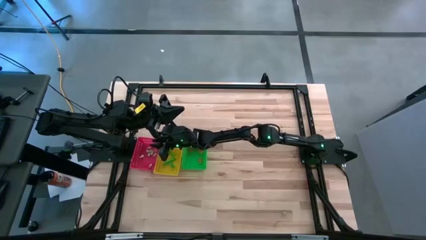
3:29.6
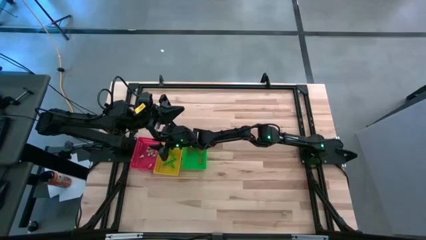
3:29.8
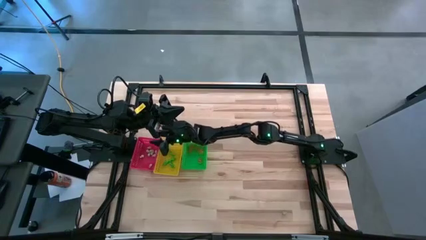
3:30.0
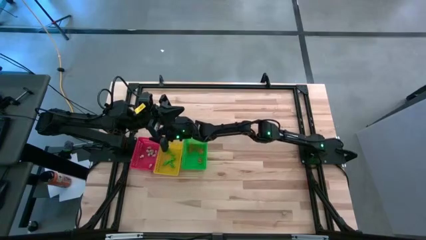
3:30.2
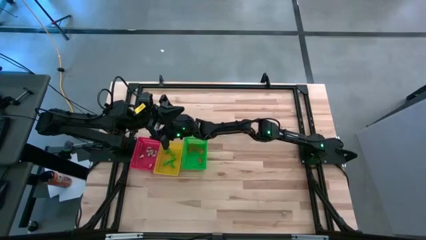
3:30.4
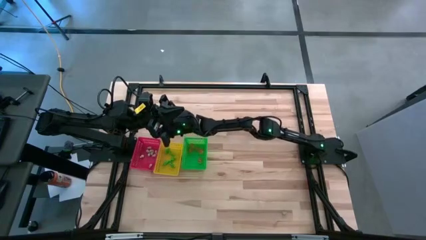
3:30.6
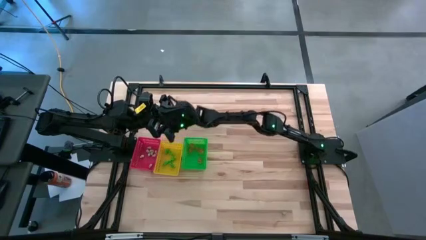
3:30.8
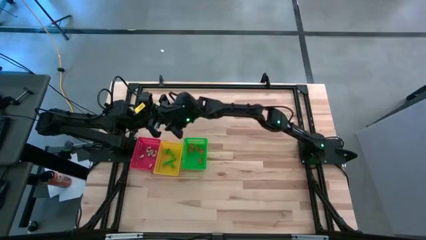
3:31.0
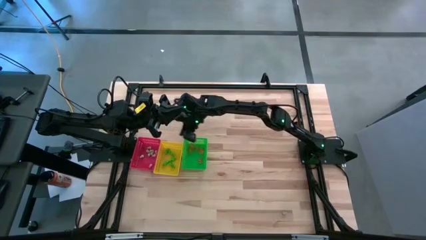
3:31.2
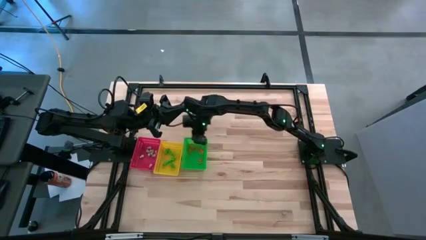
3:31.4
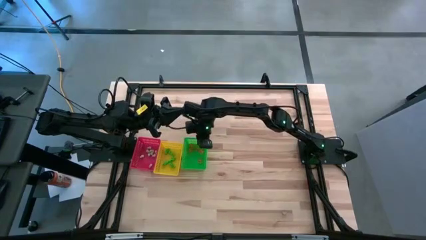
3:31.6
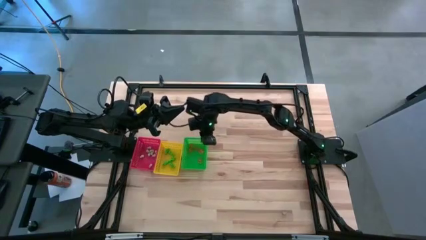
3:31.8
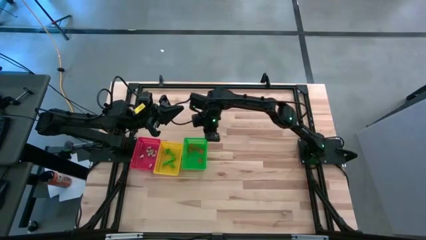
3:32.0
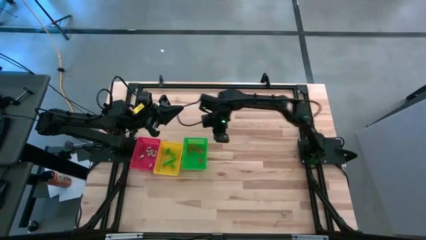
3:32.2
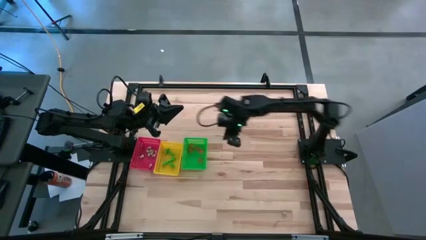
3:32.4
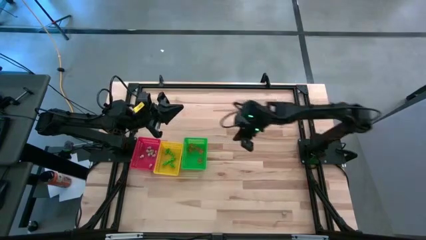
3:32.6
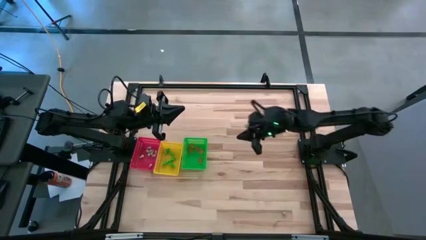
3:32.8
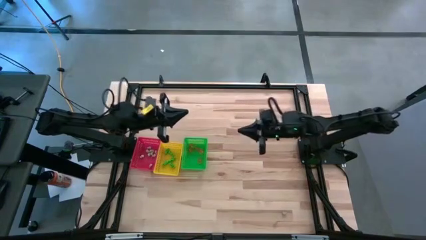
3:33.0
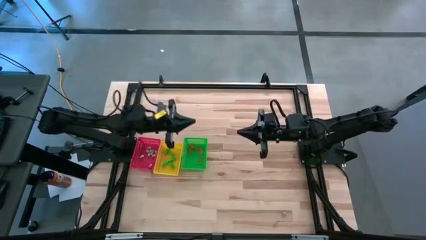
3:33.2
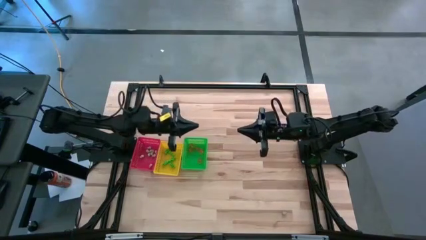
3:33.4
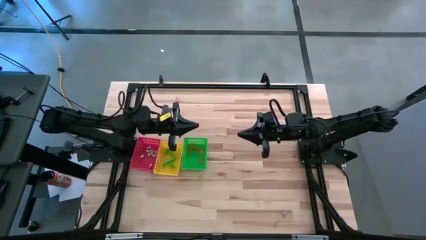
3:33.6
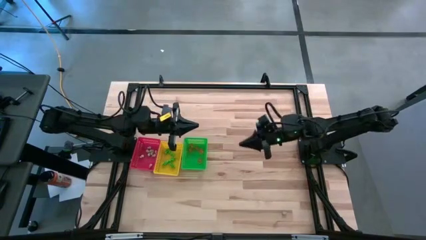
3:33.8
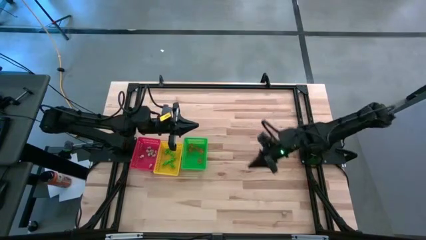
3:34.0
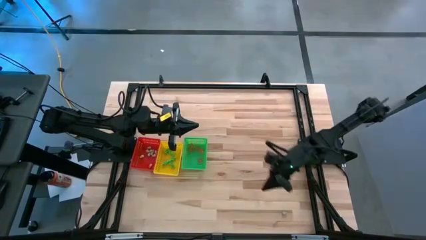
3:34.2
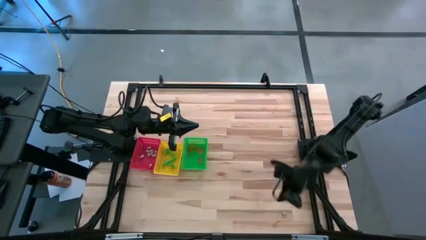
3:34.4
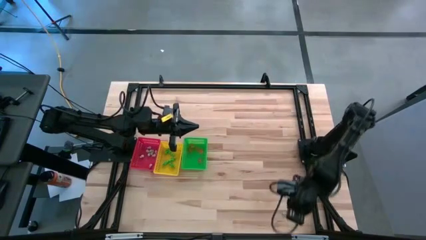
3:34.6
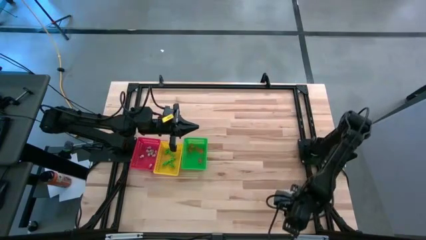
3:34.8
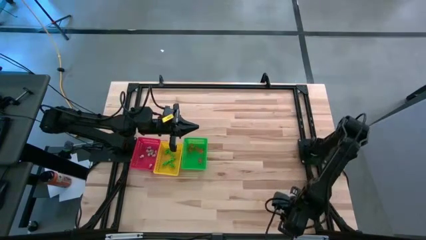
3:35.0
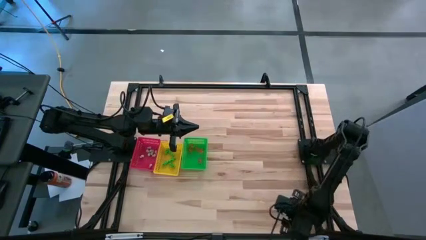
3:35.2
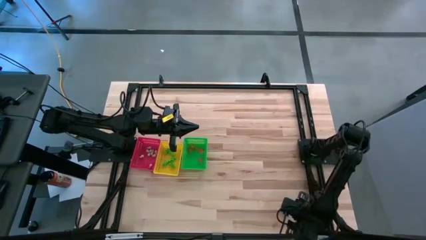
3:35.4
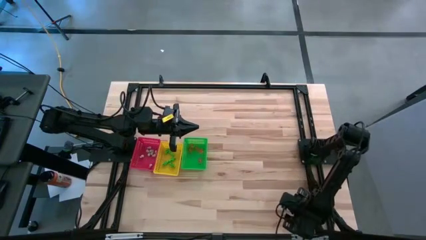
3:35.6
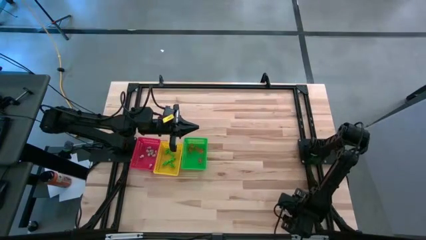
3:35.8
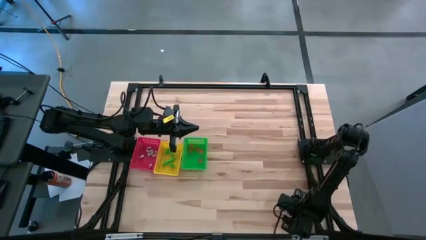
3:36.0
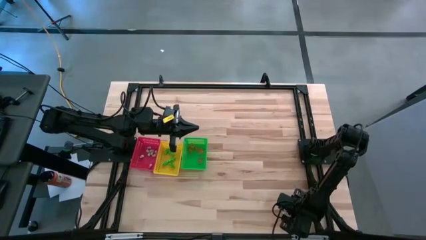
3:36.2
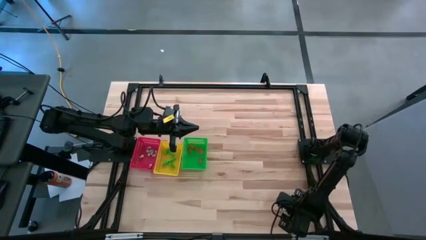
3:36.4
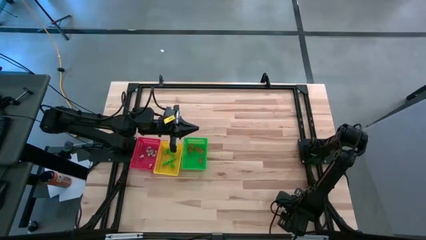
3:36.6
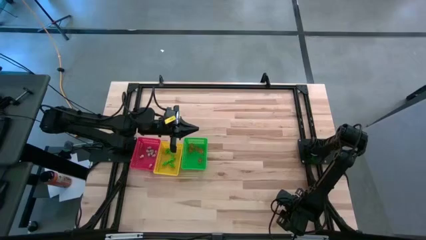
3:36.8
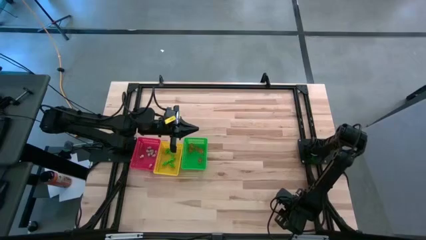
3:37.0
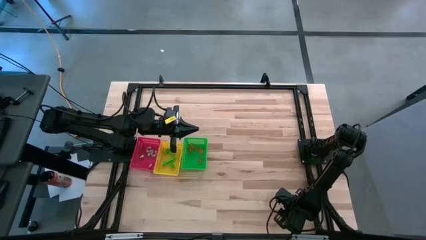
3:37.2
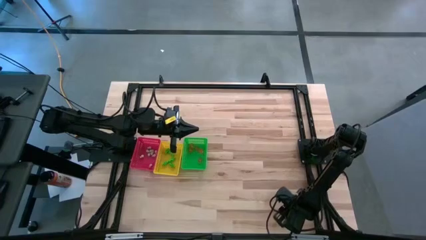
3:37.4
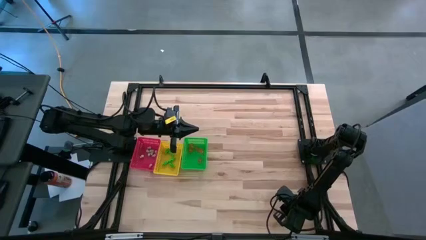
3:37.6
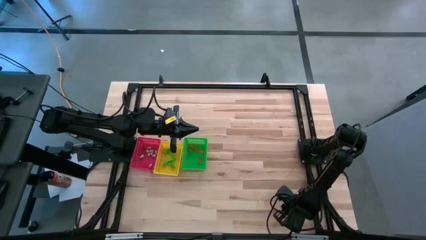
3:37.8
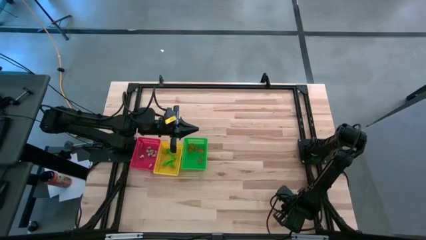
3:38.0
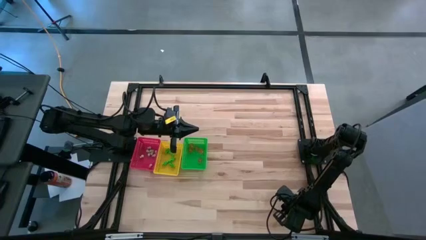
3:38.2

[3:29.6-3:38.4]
Task: Sort Halloween decoration
Put the white skull toy into the red bin

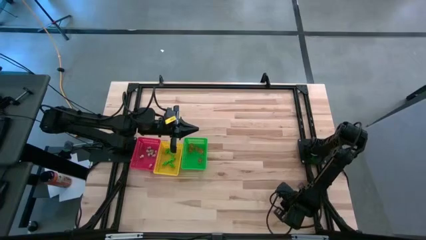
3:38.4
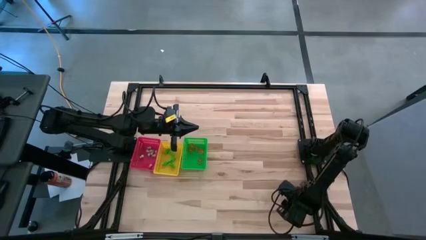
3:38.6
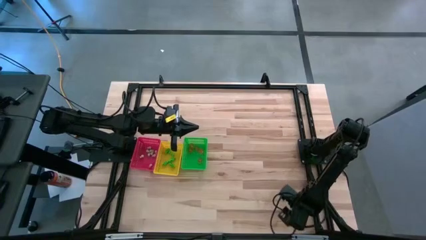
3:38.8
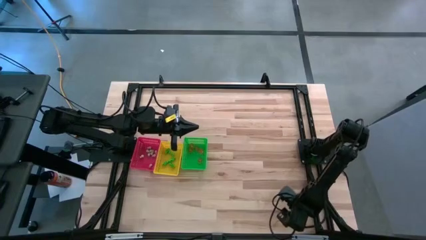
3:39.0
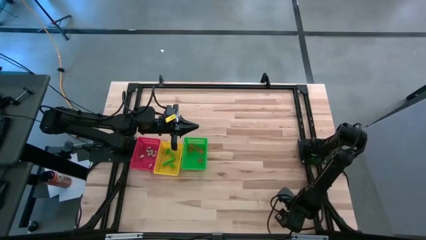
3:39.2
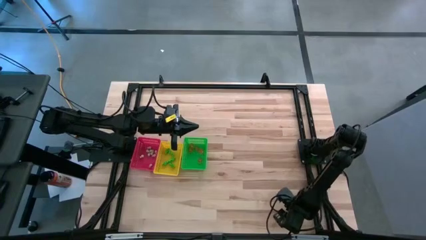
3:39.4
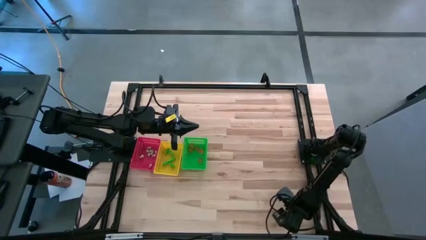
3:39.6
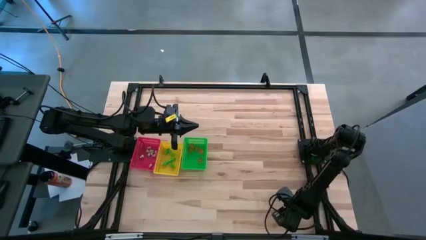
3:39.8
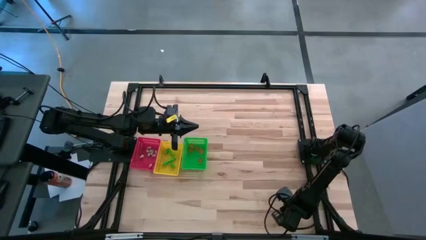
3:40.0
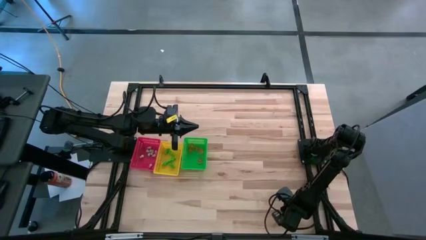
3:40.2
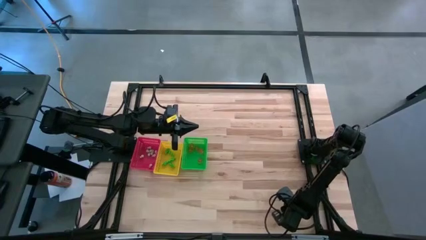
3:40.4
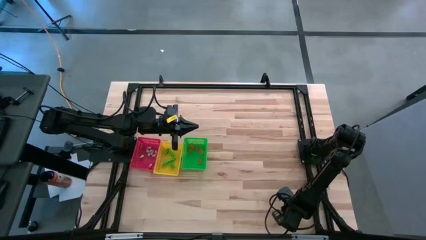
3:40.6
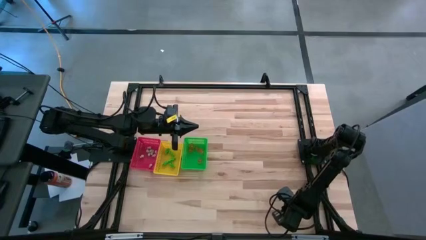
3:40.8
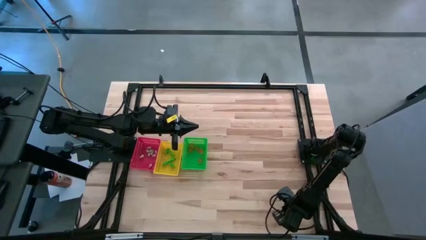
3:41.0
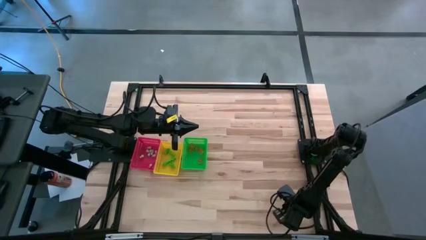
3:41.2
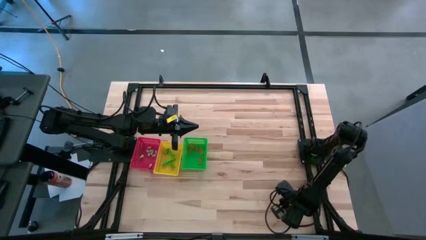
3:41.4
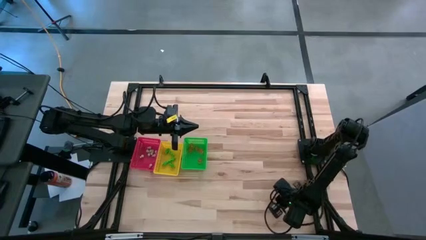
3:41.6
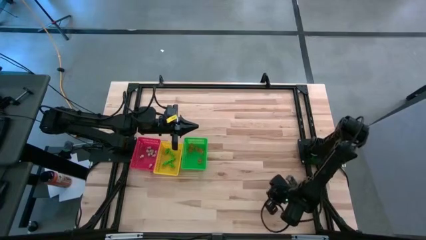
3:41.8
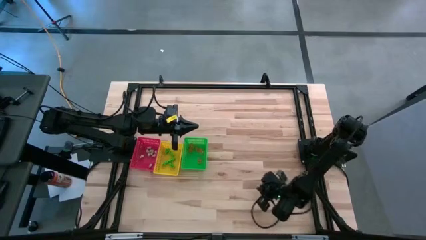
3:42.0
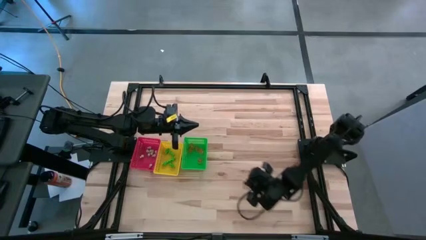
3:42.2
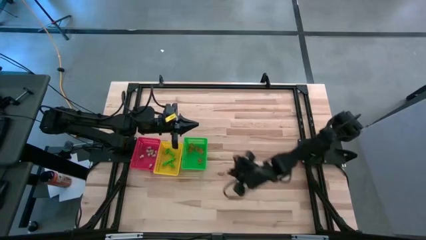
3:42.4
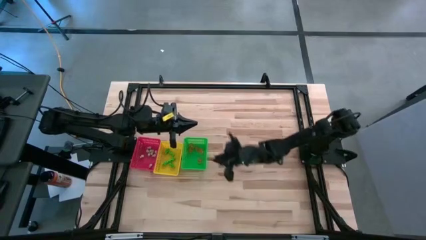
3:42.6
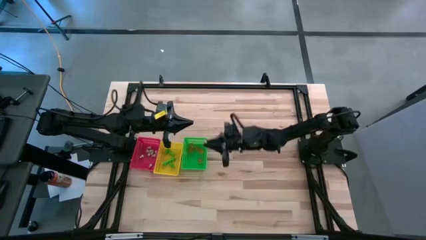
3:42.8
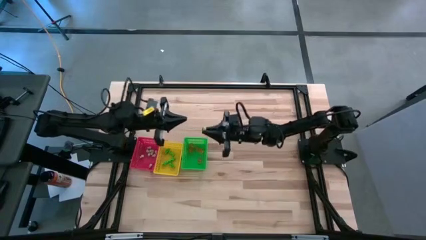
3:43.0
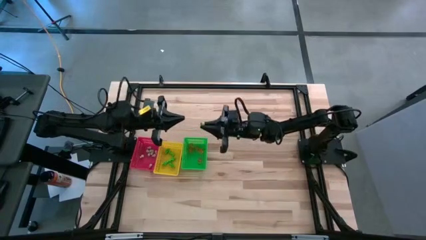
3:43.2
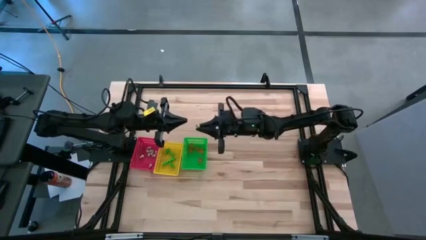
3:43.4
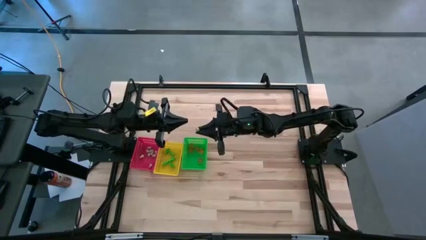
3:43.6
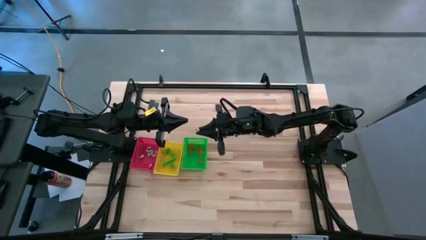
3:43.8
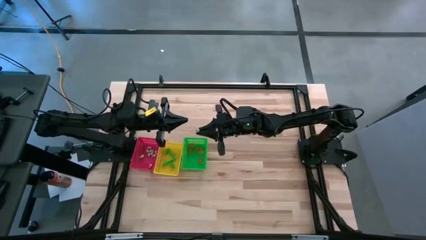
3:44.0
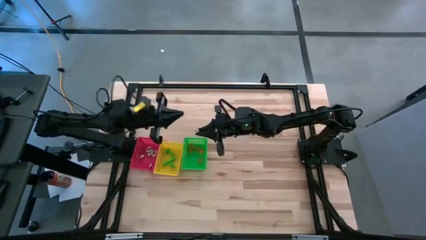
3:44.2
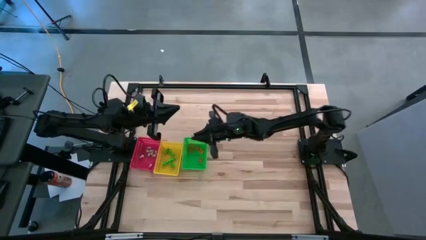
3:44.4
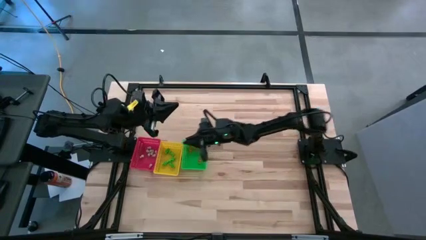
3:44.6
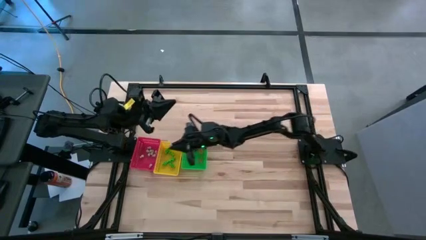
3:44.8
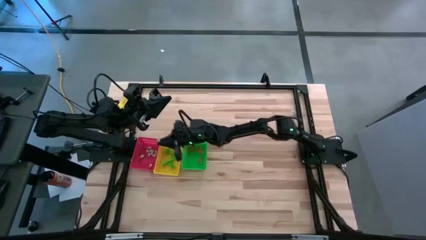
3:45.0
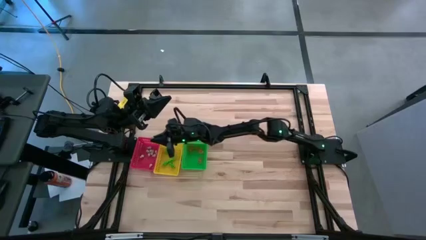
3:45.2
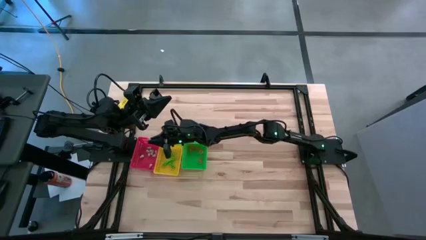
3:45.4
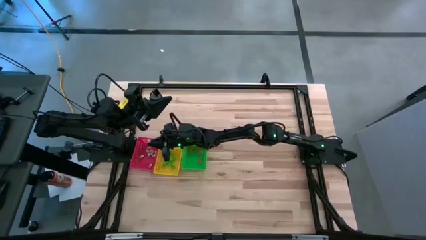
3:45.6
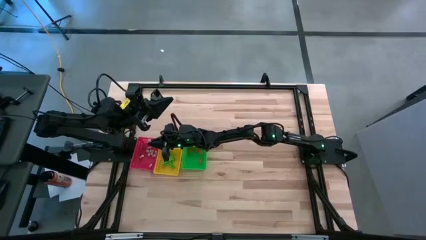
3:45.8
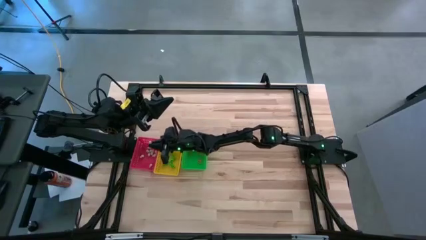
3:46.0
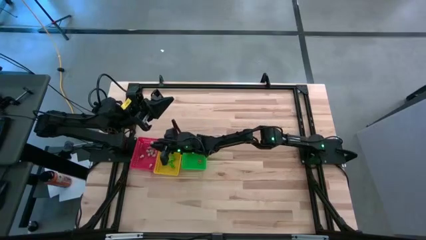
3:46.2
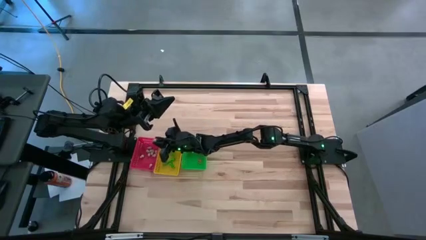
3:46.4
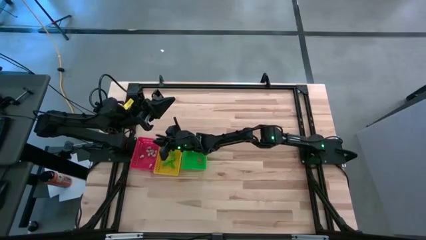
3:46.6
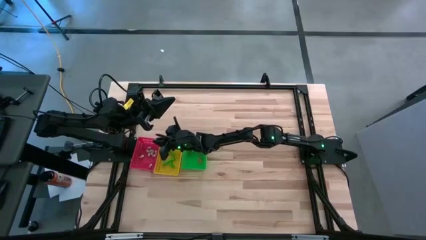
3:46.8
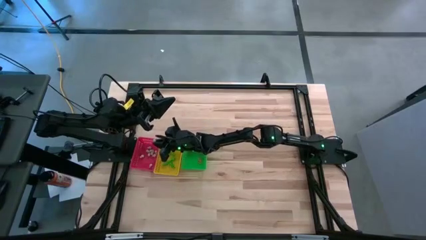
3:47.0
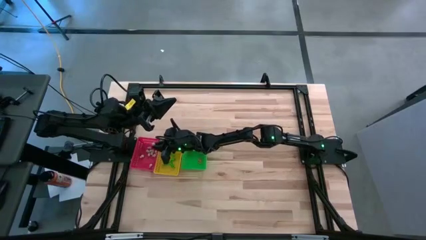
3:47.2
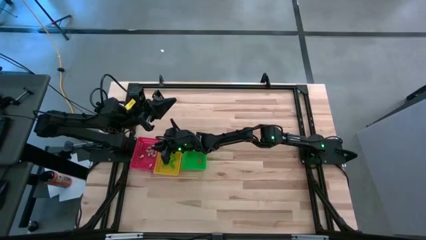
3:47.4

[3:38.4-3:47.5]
Put the white skull toy into the red bin
